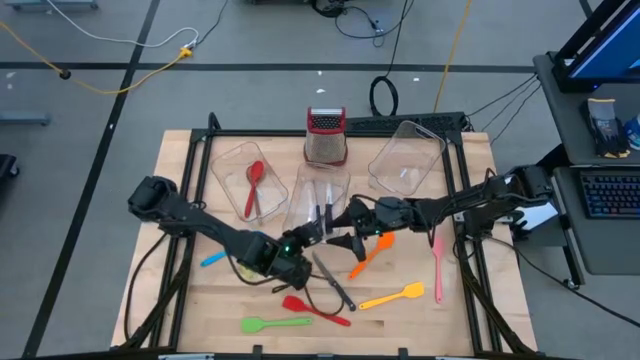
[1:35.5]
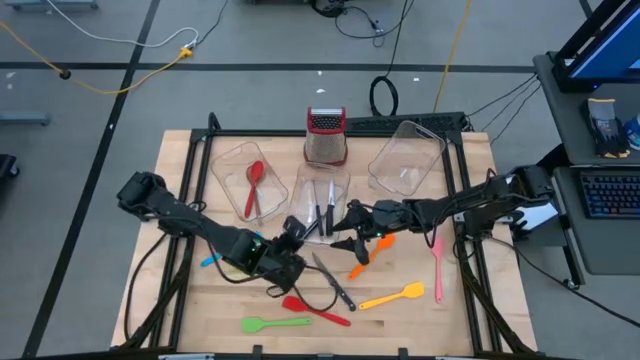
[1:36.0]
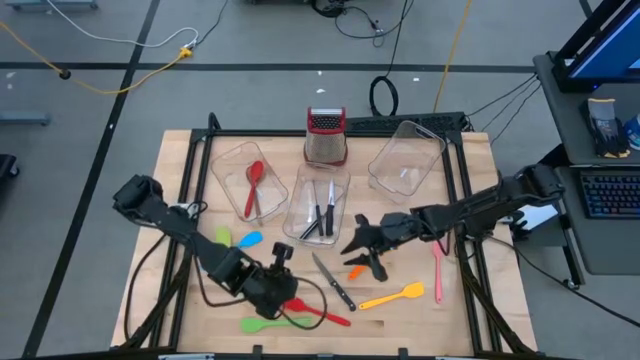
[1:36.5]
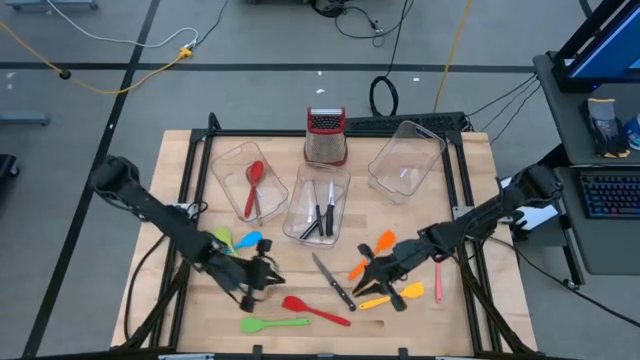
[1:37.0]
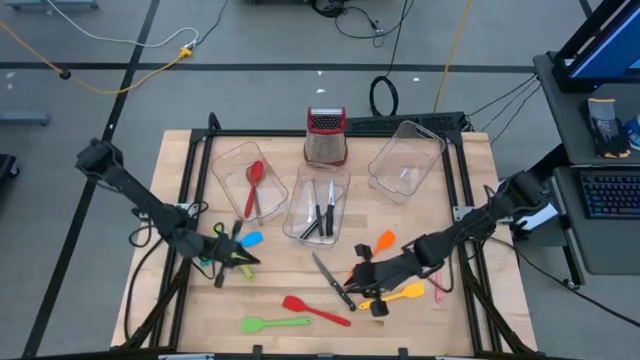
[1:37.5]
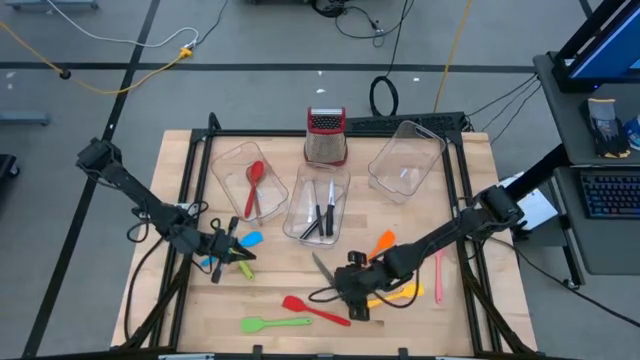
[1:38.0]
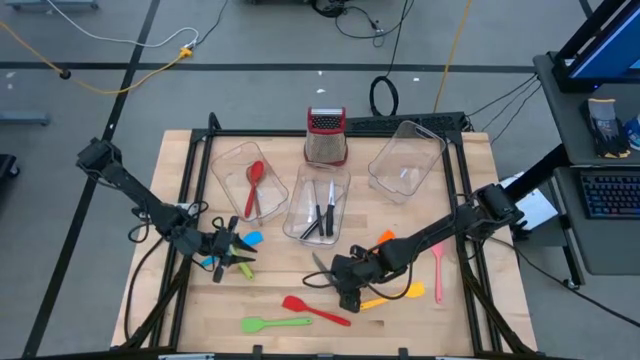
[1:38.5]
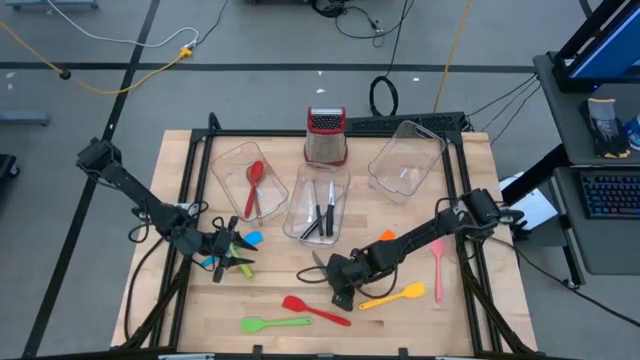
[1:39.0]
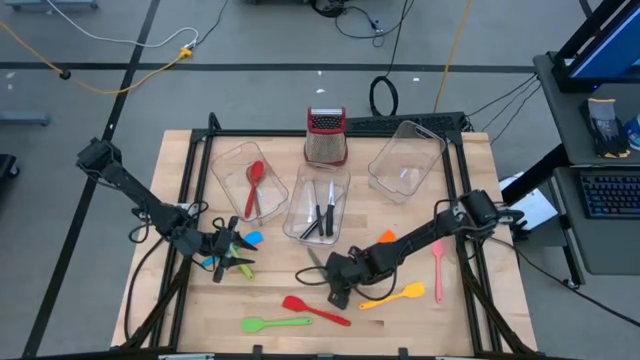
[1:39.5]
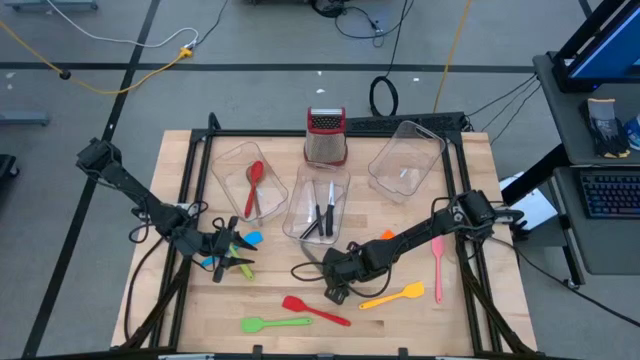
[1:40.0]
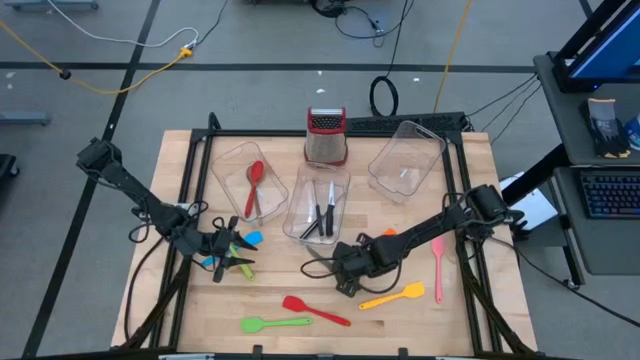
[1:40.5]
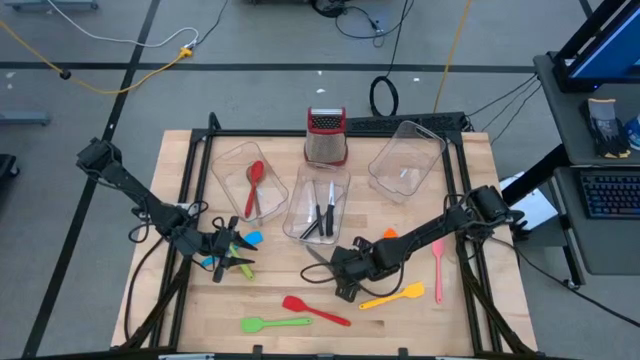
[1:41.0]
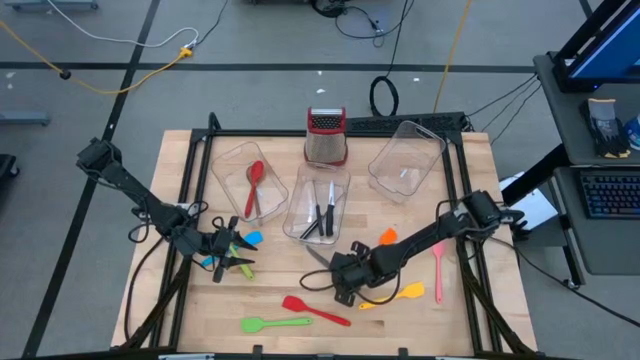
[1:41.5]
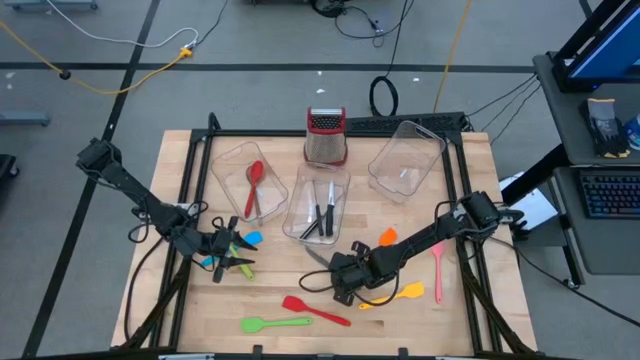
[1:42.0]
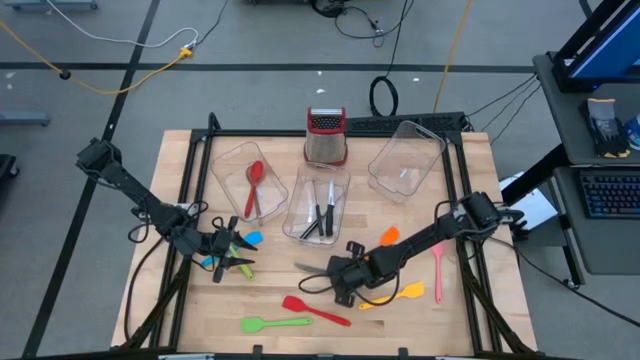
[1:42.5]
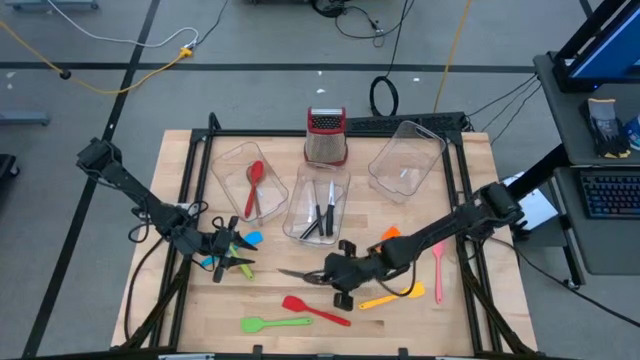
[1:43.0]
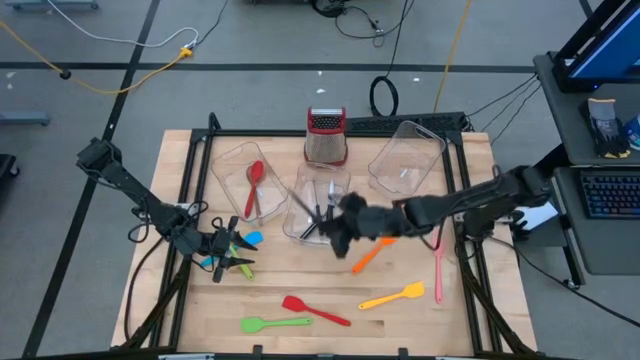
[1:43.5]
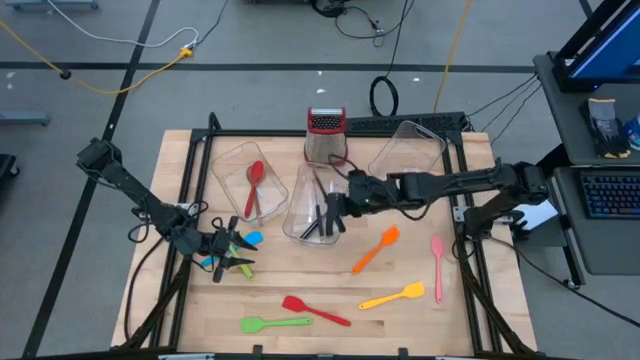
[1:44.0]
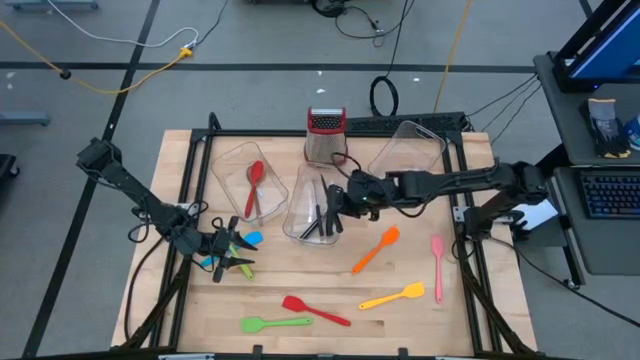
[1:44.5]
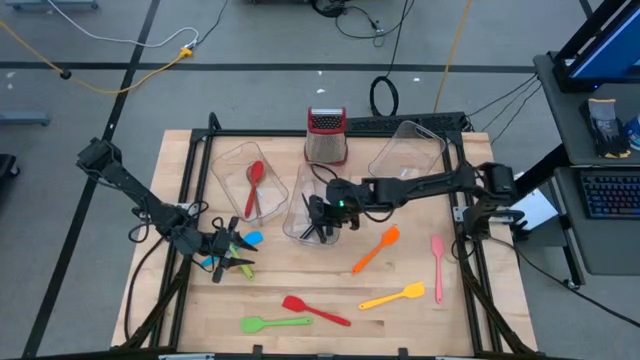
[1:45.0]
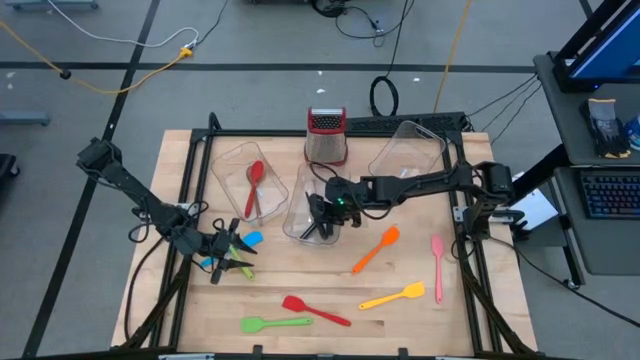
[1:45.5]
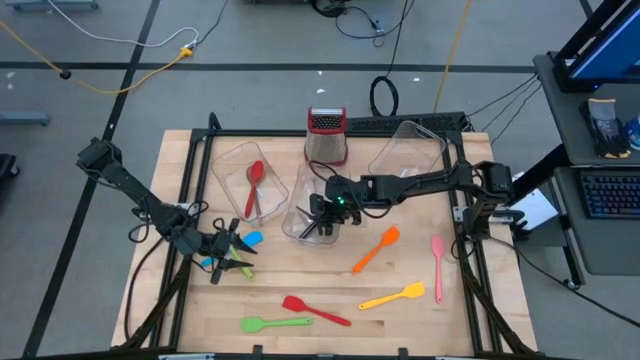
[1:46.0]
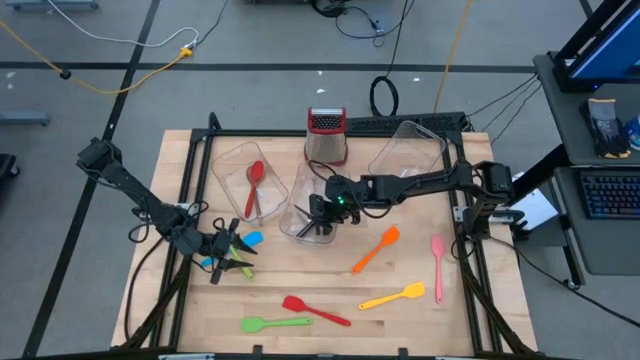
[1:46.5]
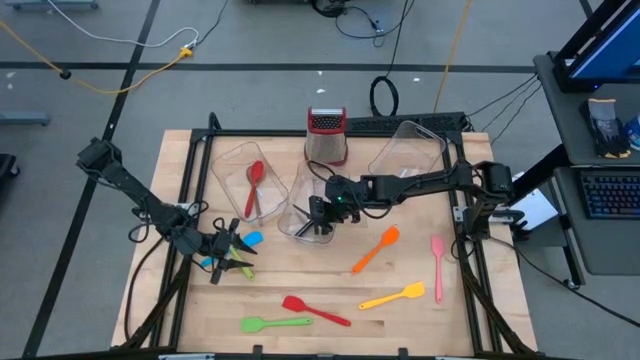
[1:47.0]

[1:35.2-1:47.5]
Task: Pick & Place Kitchen Items
Put the black knife into the middle transparent bin

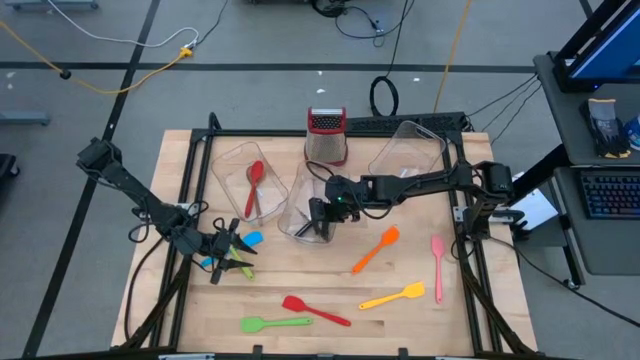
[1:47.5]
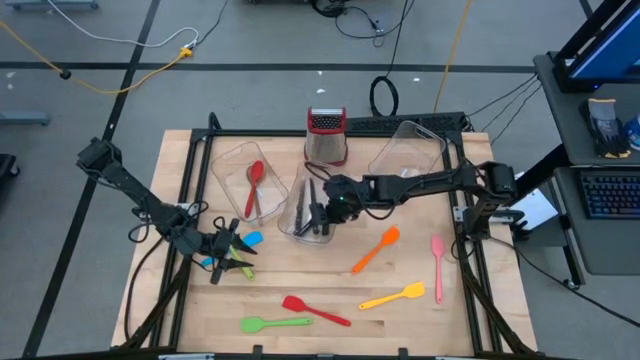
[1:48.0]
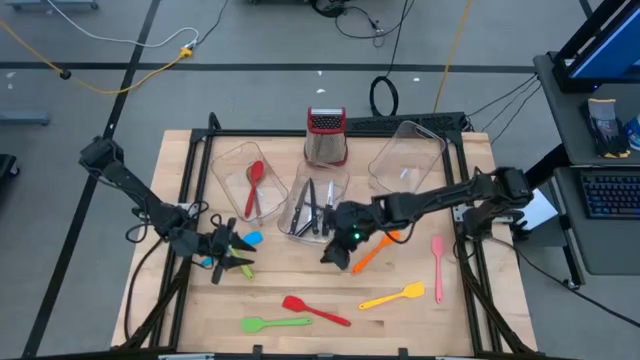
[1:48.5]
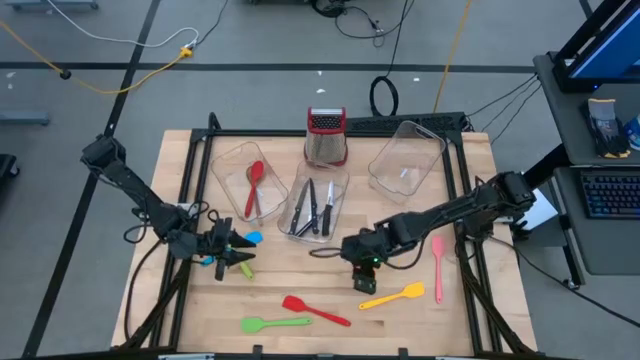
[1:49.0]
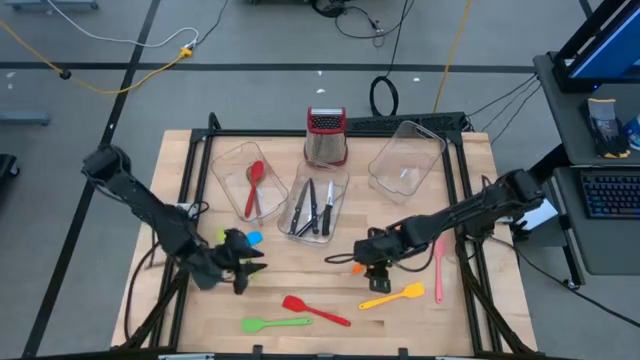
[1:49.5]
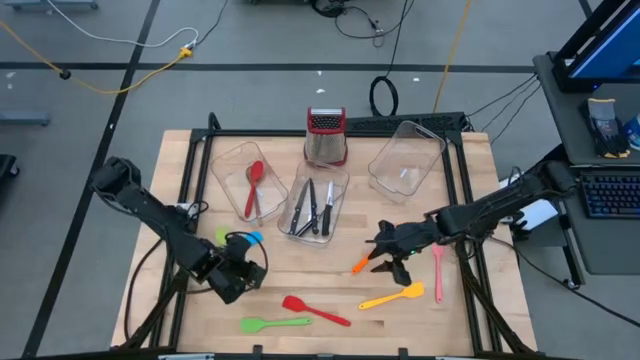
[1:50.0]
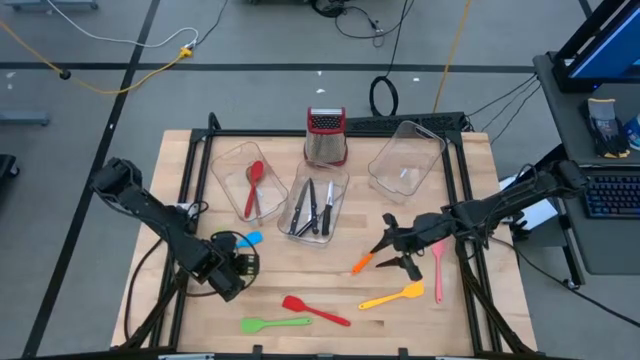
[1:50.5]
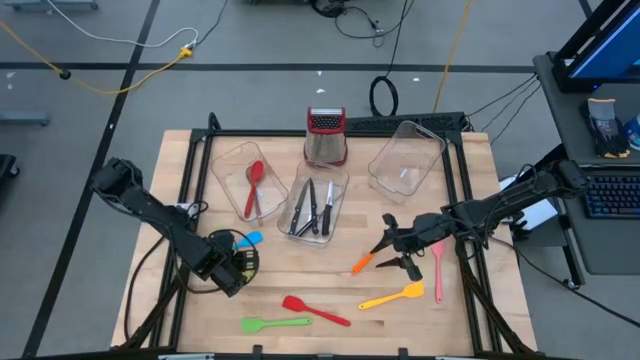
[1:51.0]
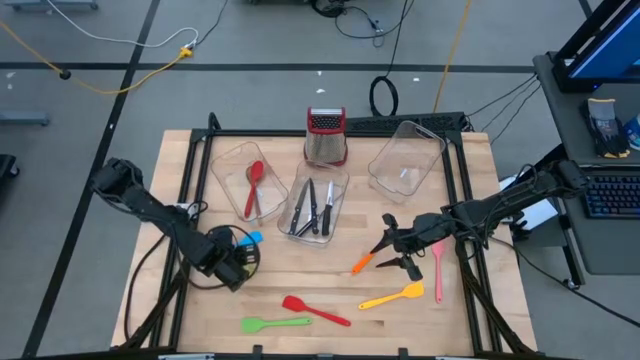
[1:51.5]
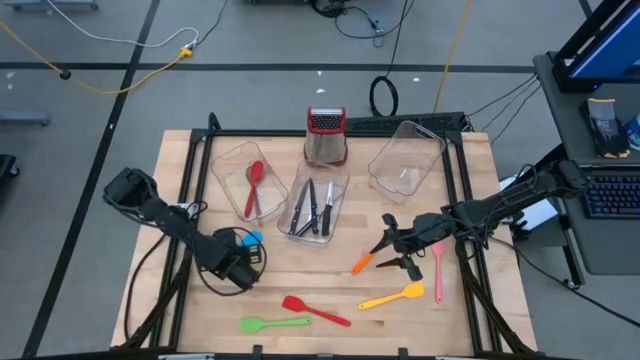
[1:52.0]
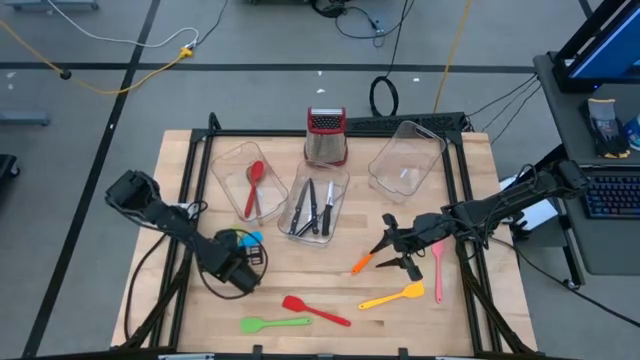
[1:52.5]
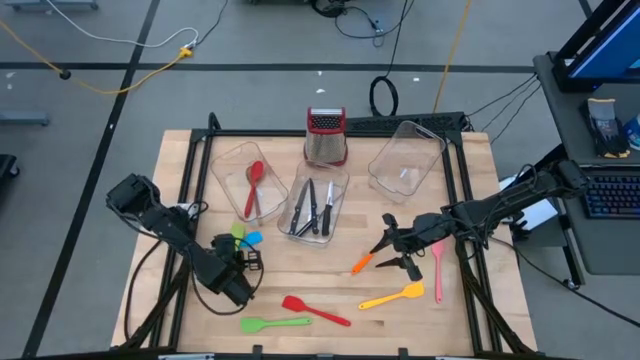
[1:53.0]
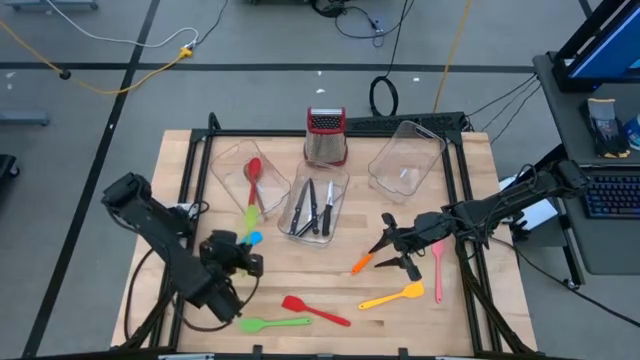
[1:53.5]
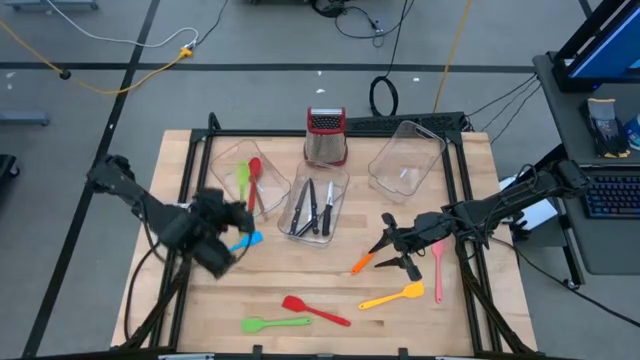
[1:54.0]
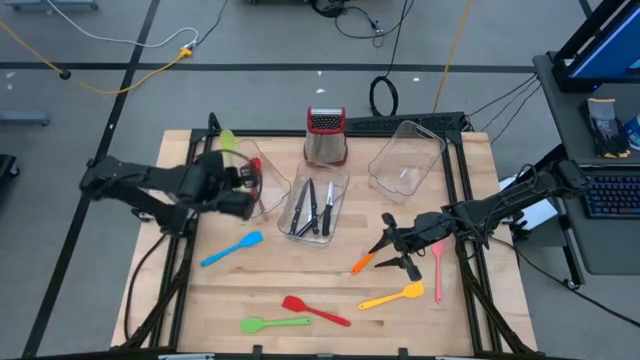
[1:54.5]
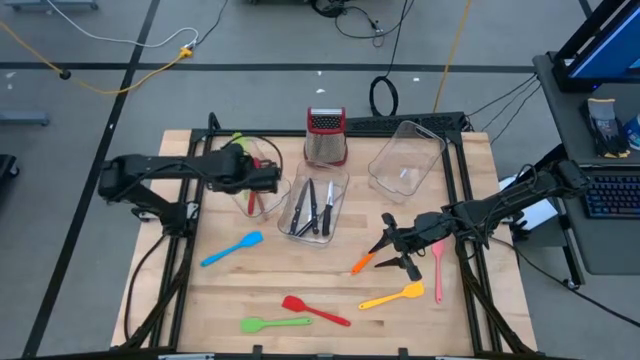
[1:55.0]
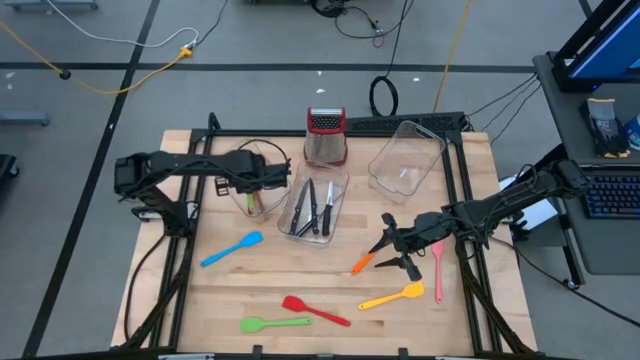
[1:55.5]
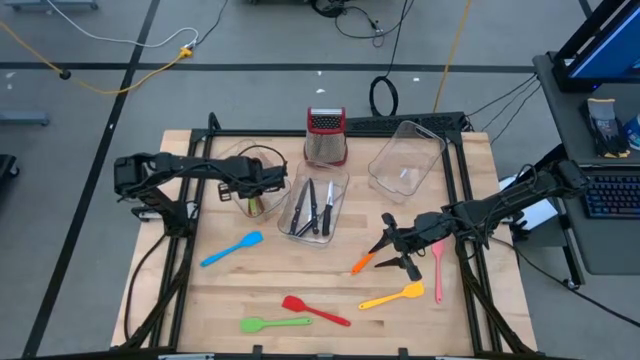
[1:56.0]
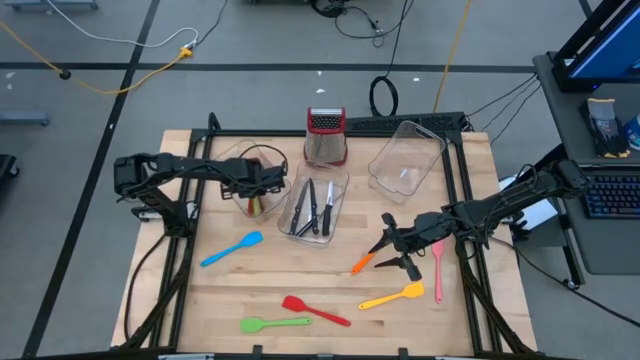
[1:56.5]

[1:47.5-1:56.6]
Put the light green ladle into the left transparent bin

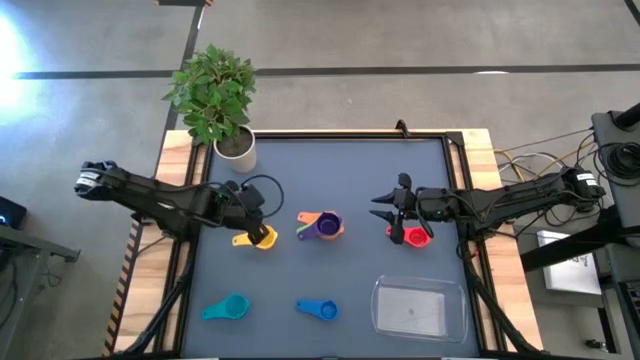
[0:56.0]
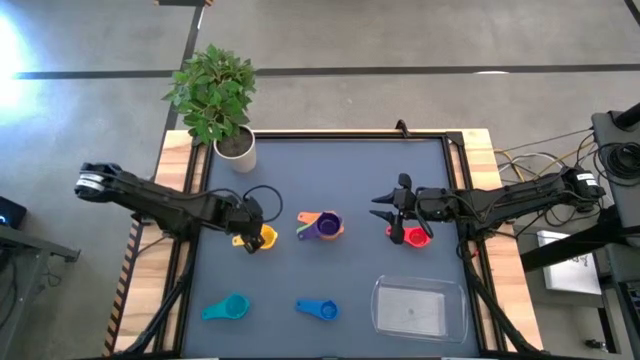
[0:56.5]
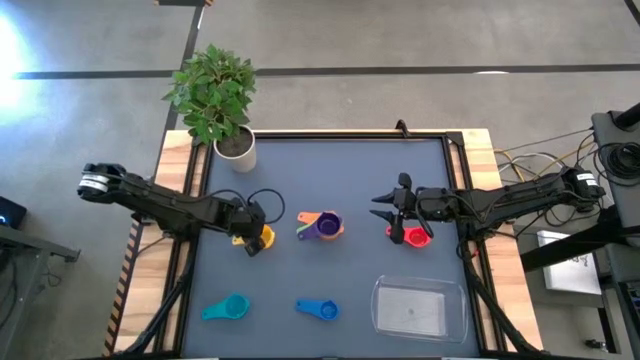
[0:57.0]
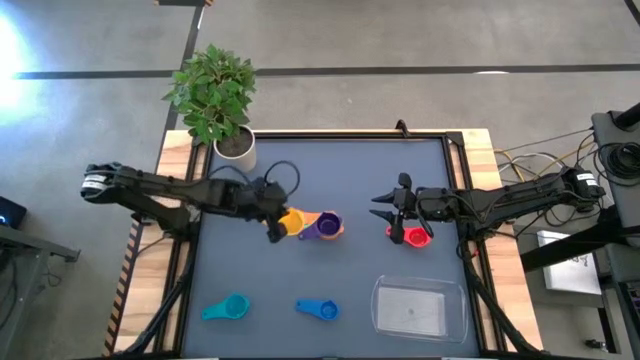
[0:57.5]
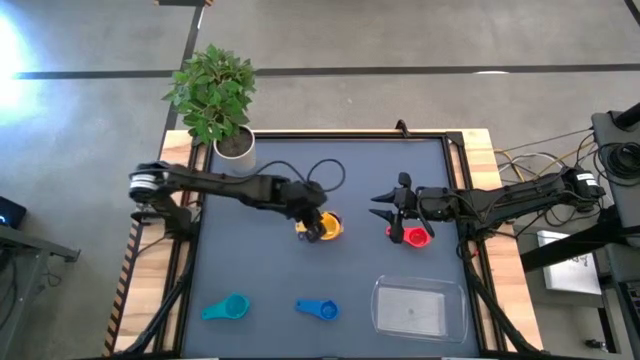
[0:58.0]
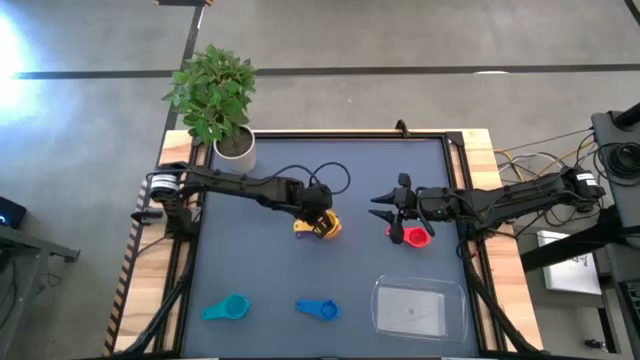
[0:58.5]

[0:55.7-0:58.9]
Task: Nest measuring cups in basket
Stack the yellow measuring cup on top of the purple measuring cup
